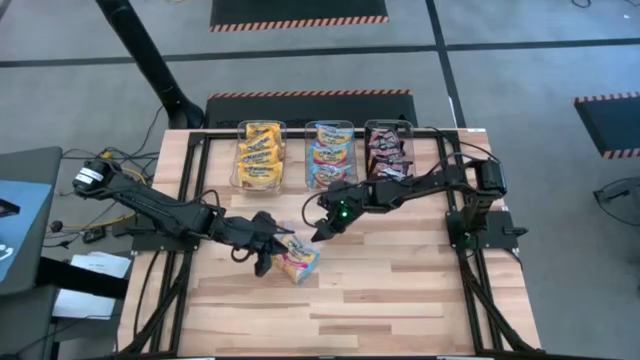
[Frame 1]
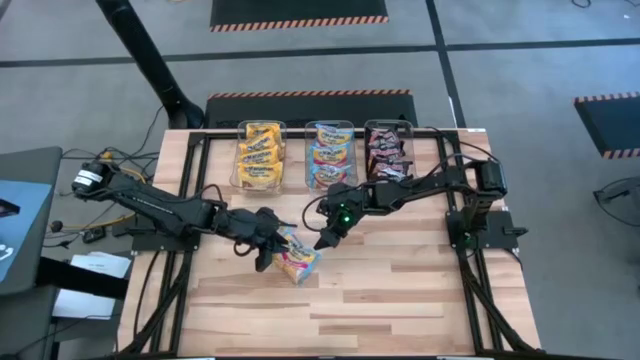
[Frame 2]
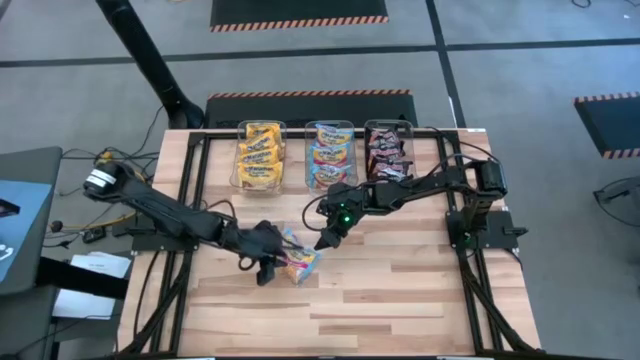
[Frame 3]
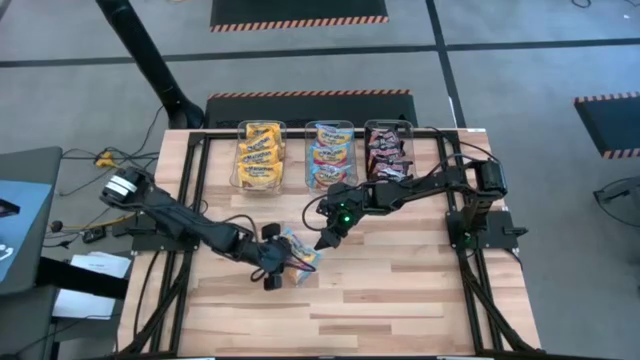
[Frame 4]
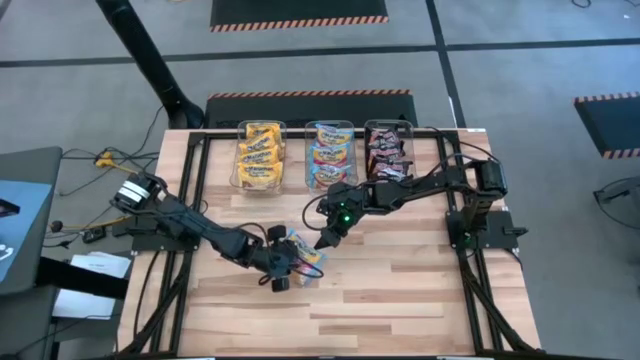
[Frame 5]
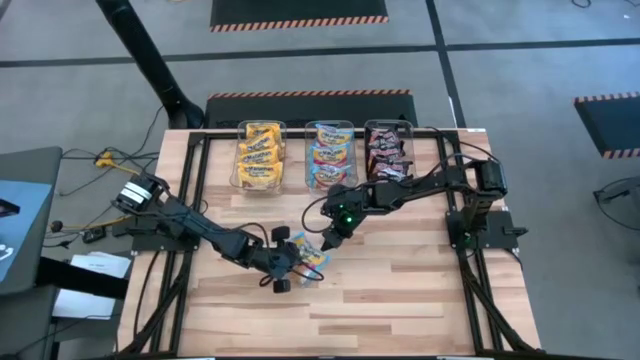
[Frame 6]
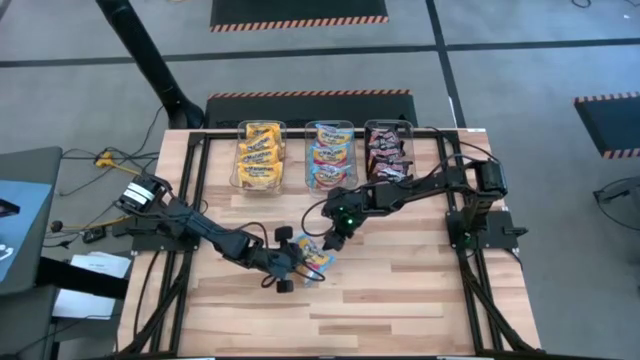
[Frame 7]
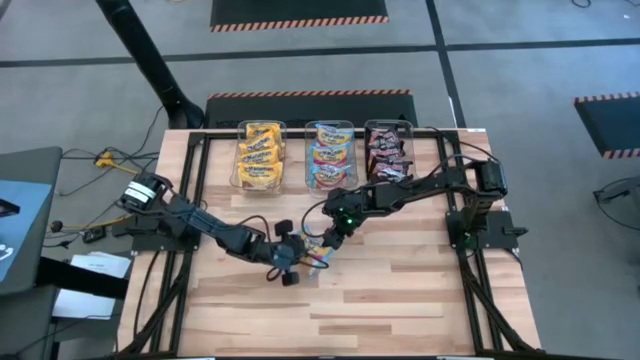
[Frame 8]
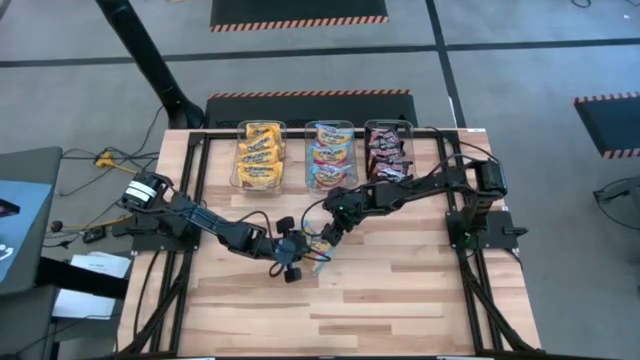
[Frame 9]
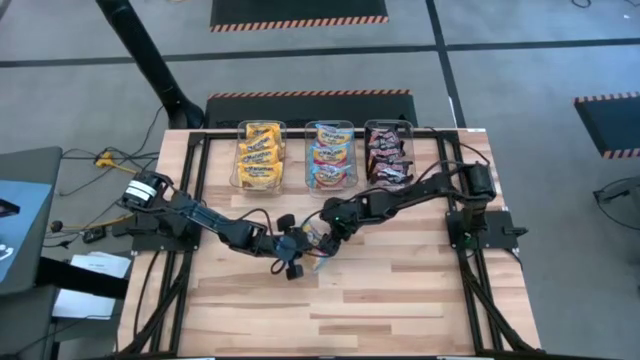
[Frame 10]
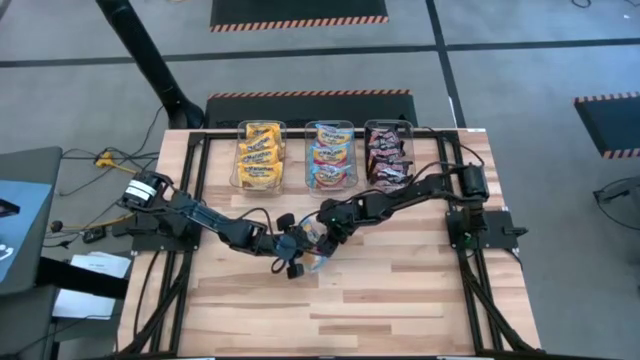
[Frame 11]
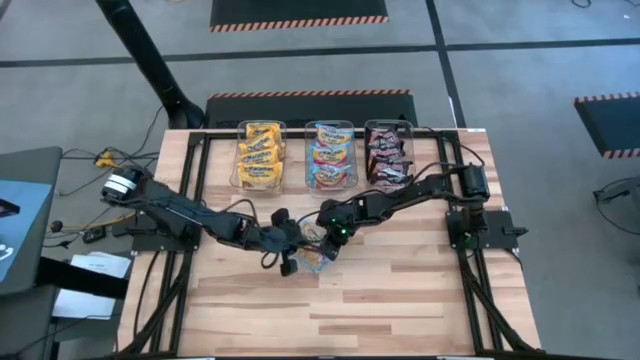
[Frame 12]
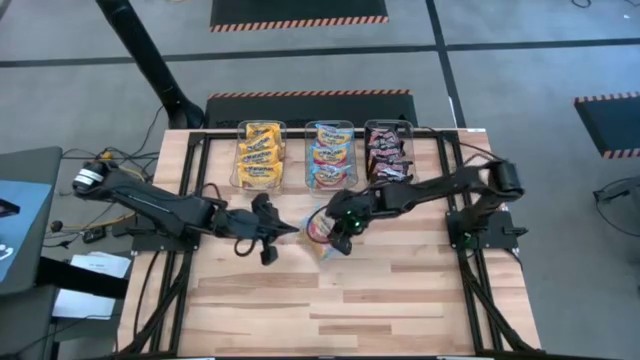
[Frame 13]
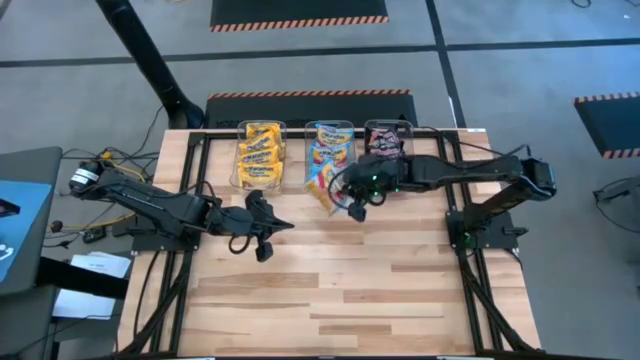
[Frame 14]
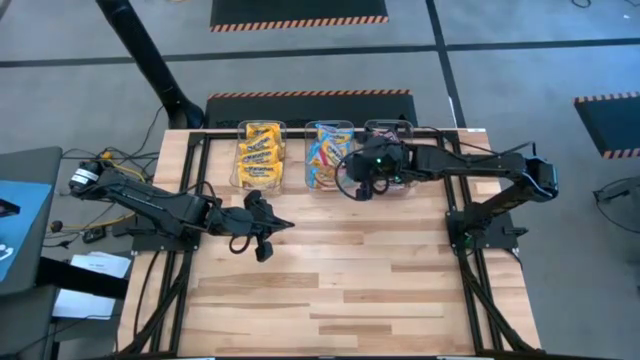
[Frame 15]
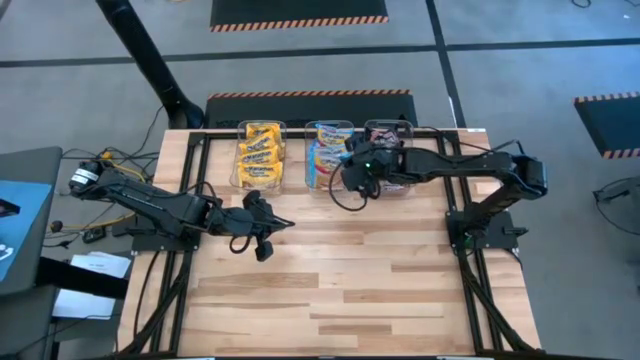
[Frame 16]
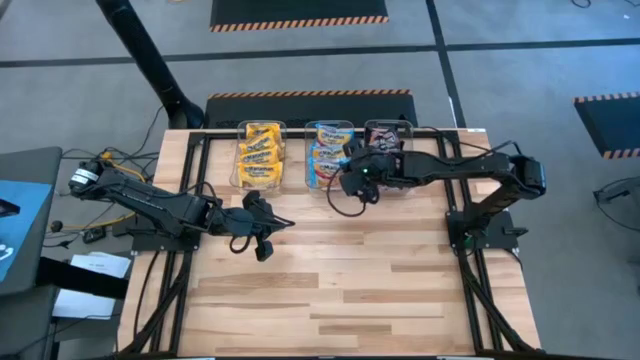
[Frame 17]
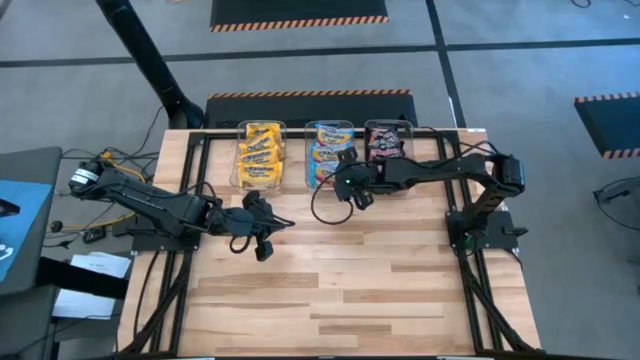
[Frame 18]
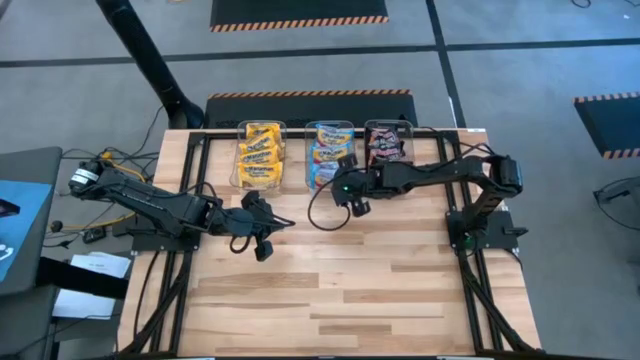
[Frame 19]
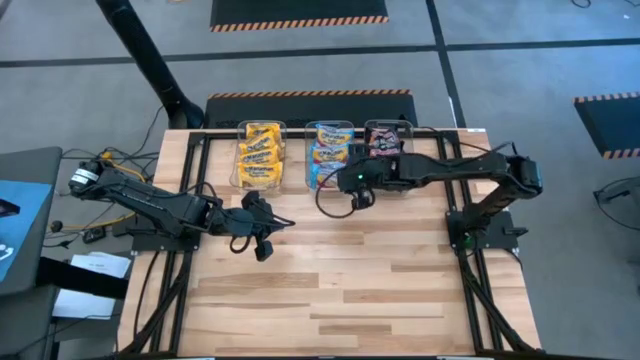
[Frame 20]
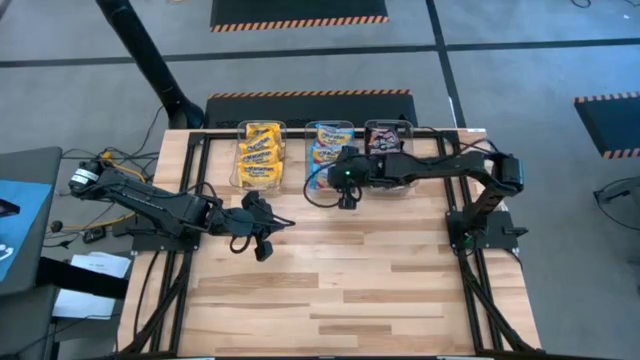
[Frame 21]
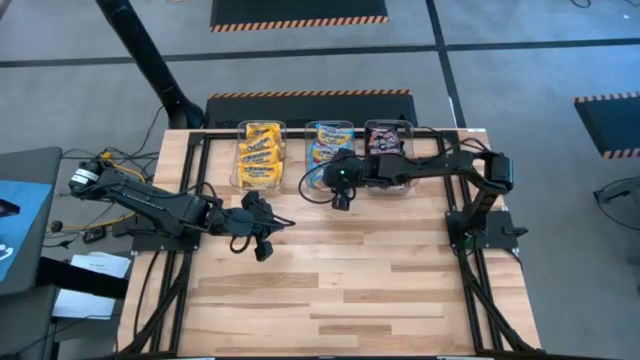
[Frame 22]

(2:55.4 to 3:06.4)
Task: Sort Maruchan noodles
Put the blue noodle pack into the middle transparent bin

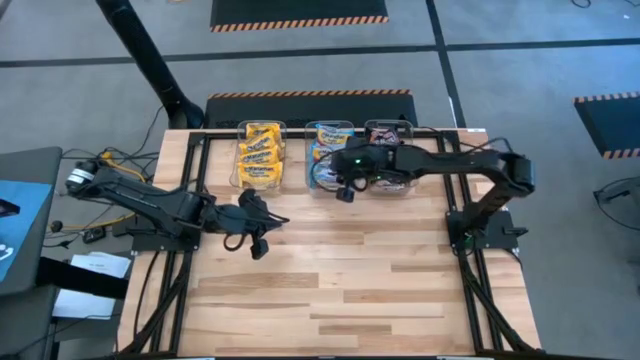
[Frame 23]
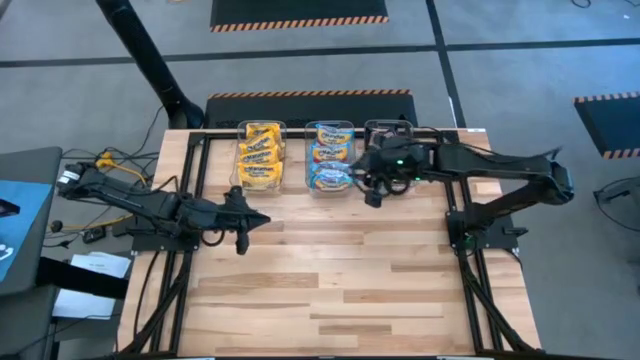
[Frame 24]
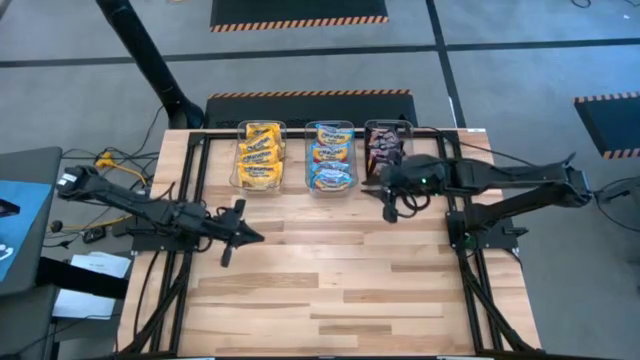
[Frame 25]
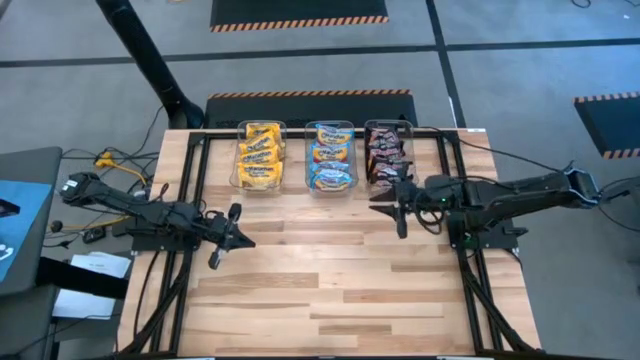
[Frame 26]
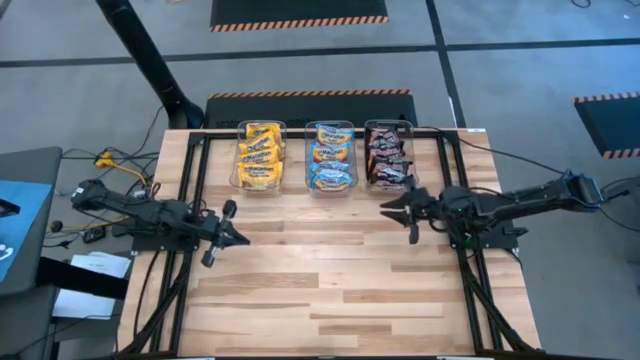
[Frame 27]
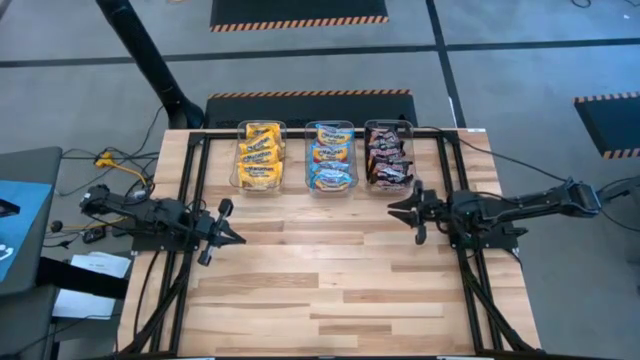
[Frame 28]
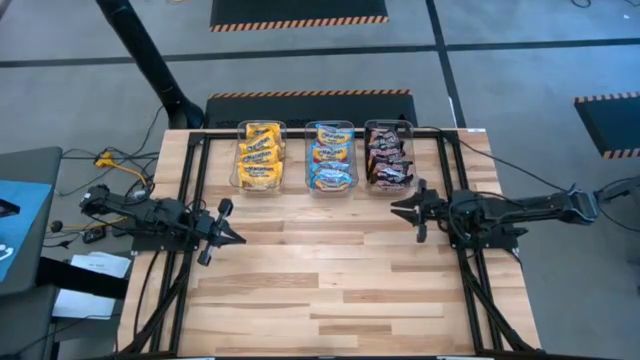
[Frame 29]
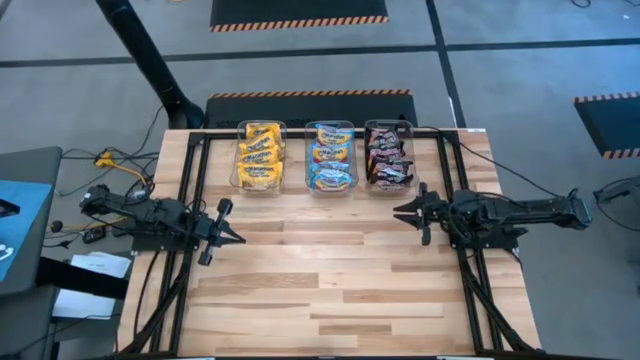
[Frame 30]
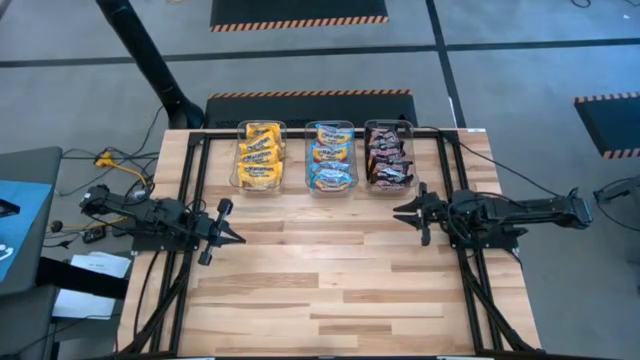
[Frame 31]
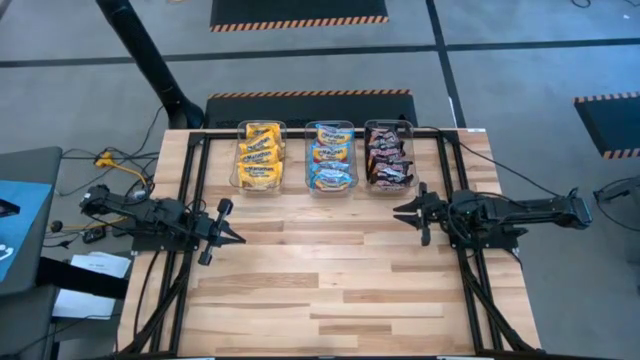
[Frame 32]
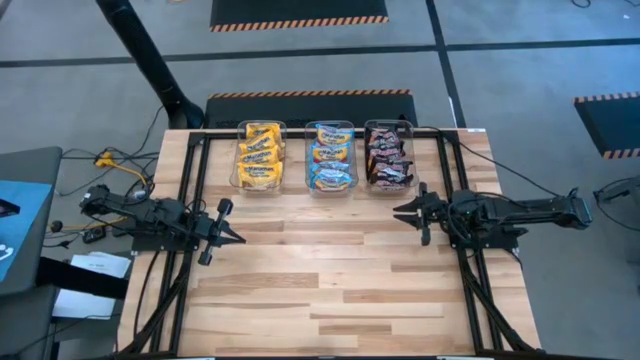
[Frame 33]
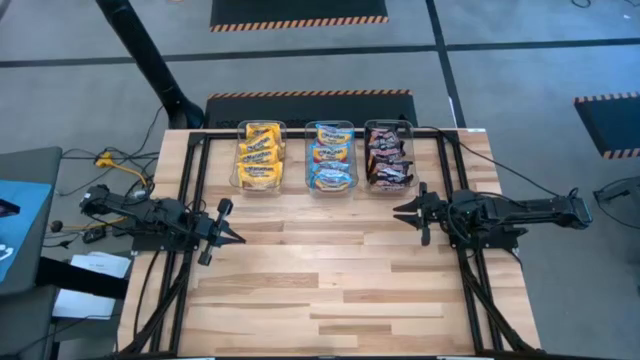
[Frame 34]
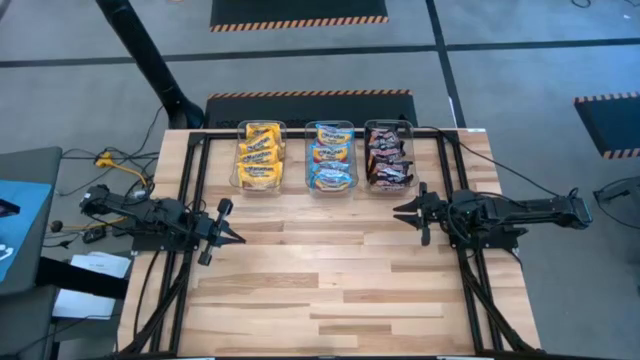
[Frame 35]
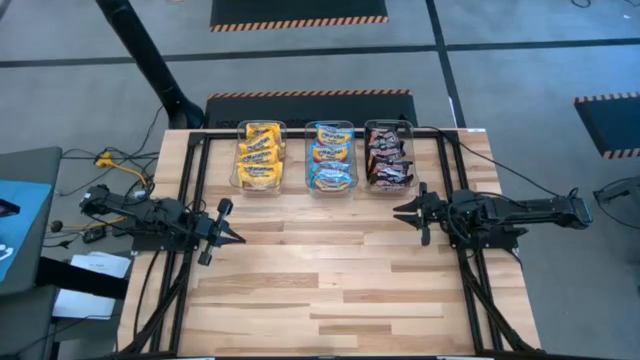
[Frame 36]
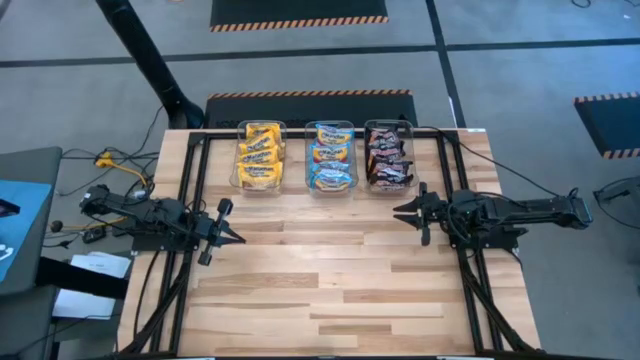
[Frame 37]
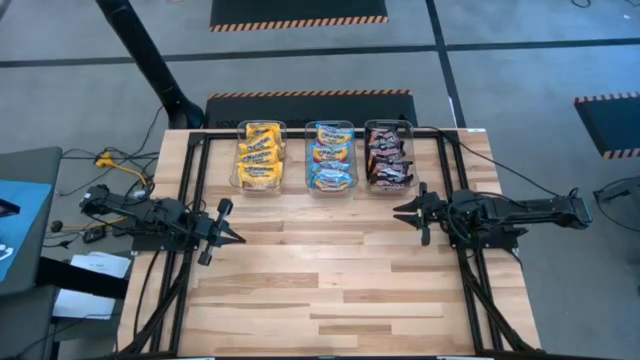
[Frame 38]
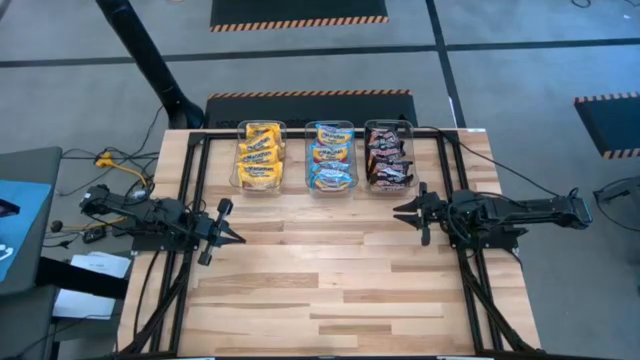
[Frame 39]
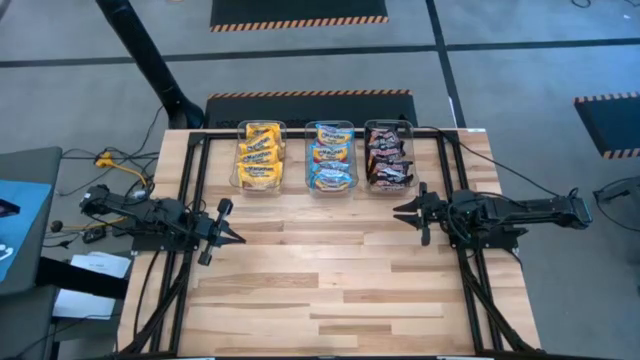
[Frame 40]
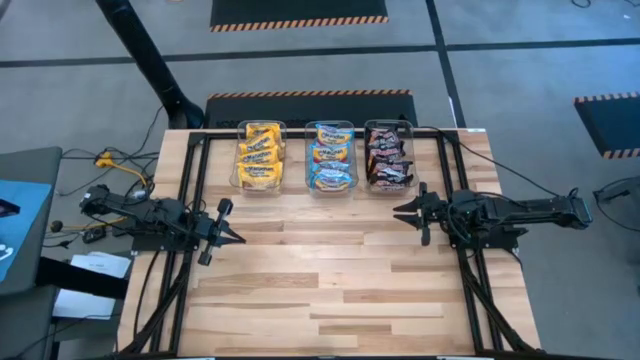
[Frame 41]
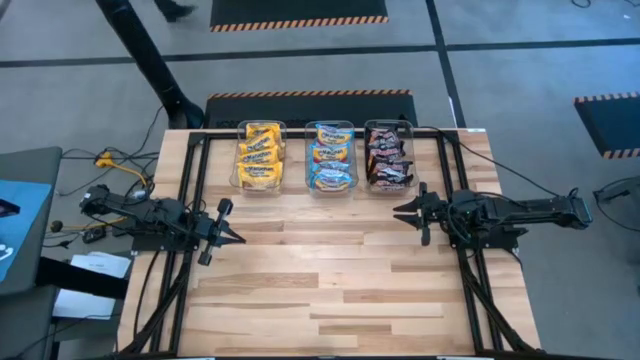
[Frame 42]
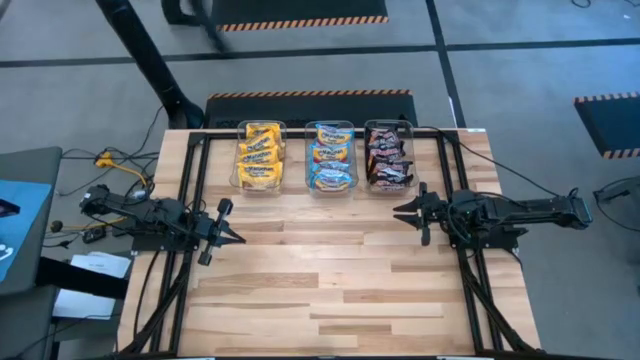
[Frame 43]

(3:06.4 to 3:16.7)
Return to Home Position
